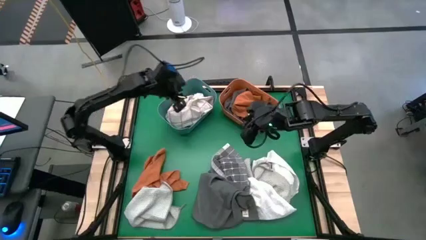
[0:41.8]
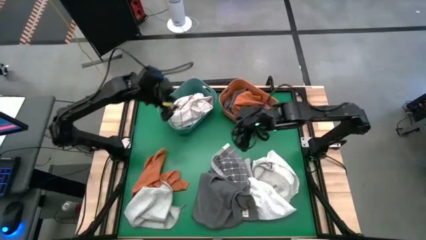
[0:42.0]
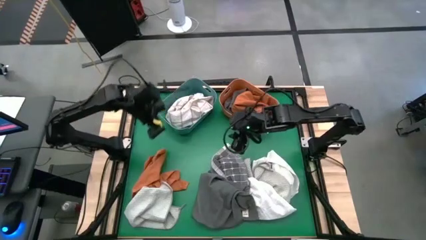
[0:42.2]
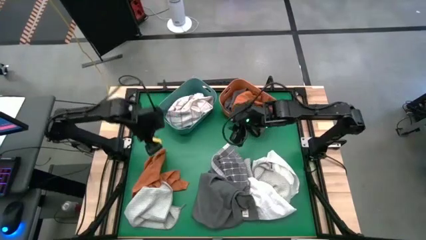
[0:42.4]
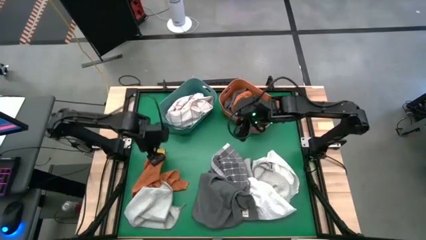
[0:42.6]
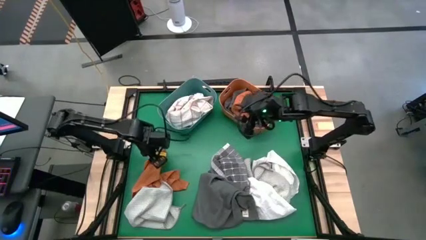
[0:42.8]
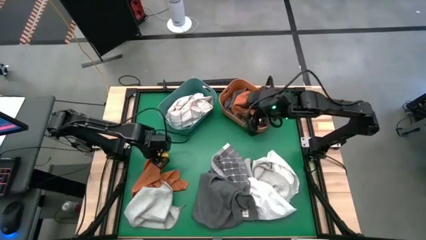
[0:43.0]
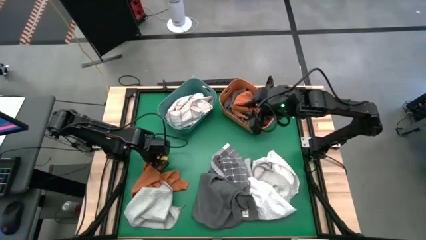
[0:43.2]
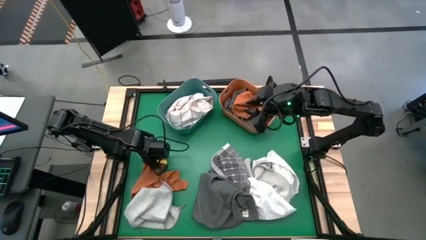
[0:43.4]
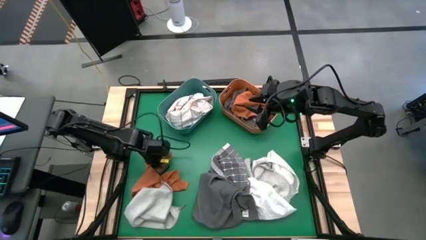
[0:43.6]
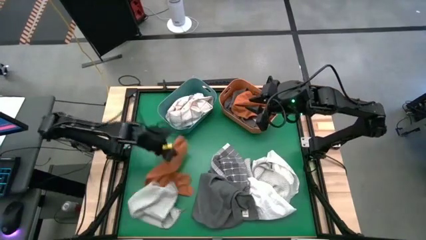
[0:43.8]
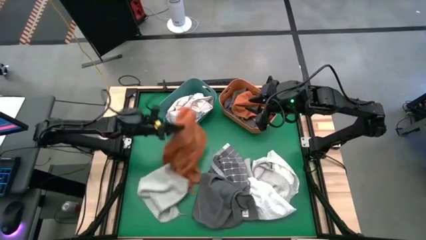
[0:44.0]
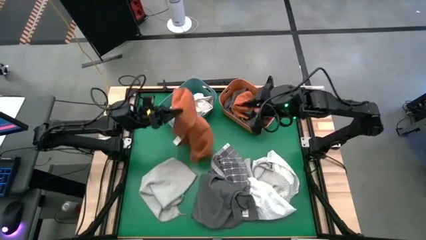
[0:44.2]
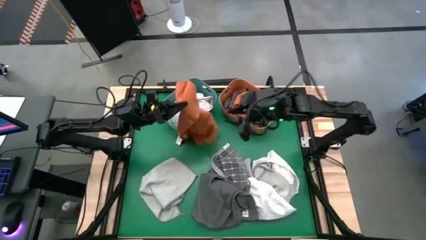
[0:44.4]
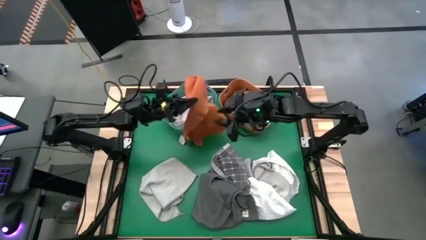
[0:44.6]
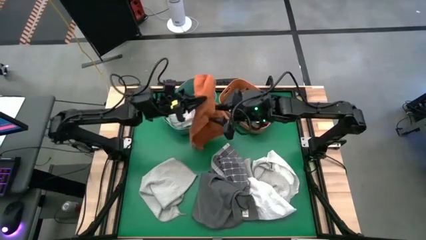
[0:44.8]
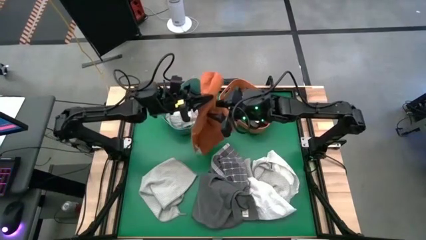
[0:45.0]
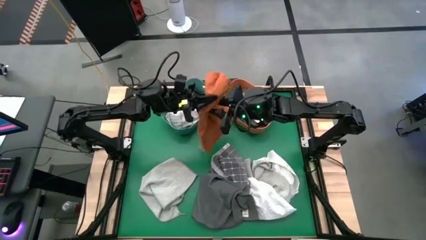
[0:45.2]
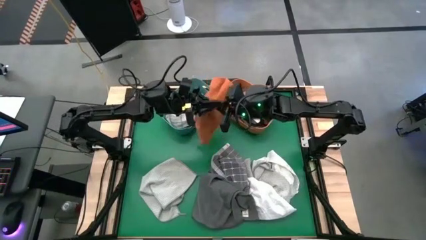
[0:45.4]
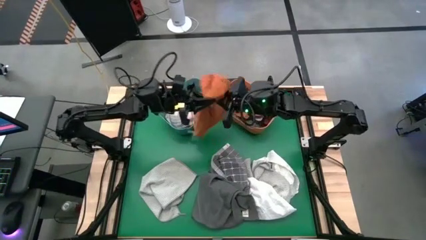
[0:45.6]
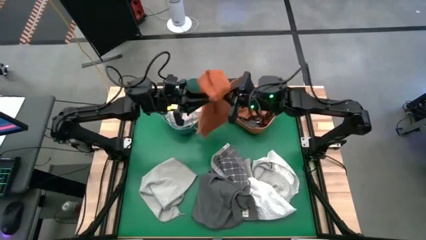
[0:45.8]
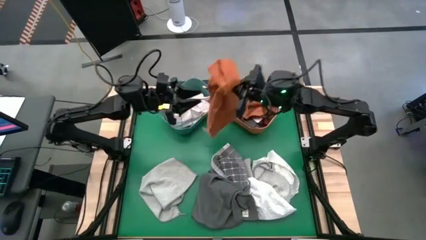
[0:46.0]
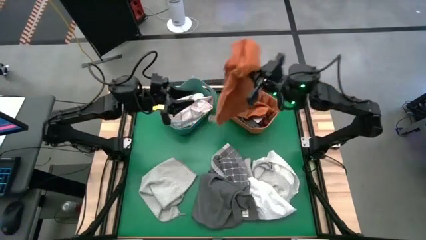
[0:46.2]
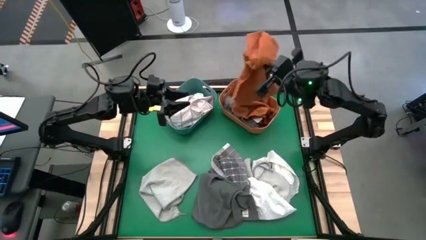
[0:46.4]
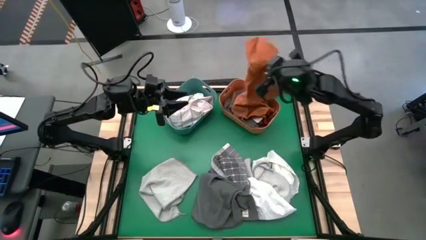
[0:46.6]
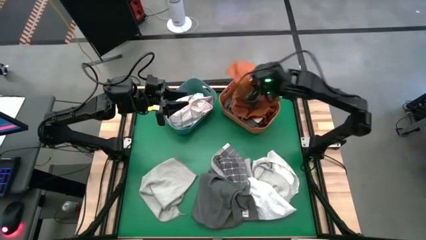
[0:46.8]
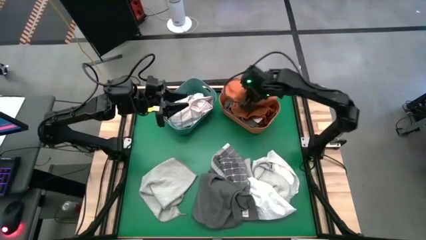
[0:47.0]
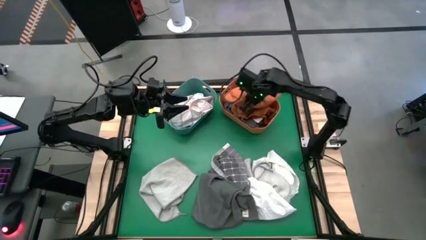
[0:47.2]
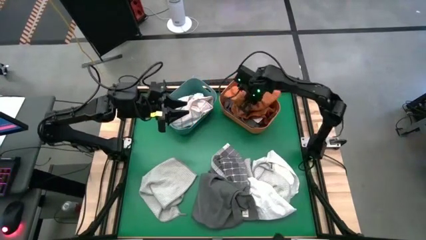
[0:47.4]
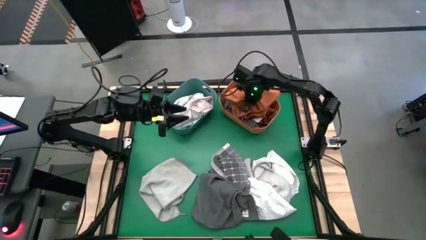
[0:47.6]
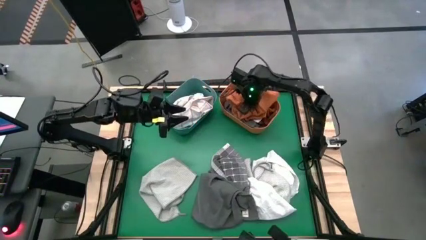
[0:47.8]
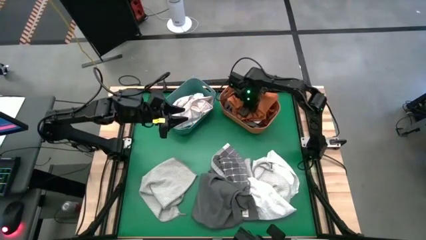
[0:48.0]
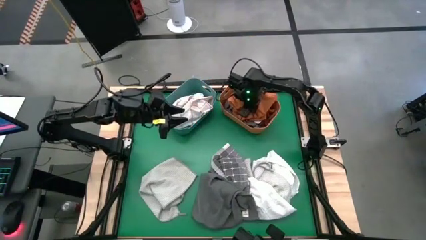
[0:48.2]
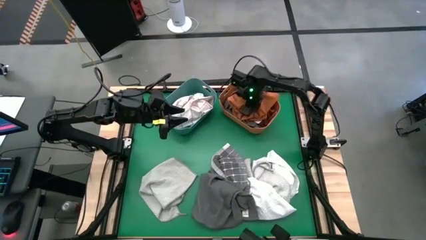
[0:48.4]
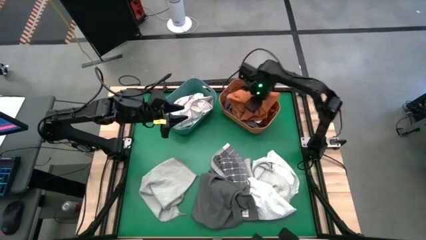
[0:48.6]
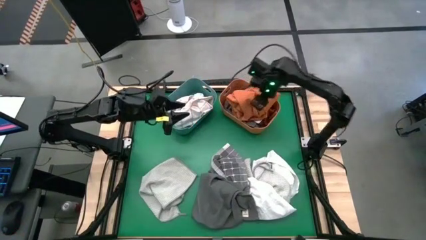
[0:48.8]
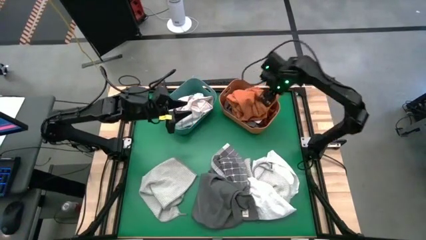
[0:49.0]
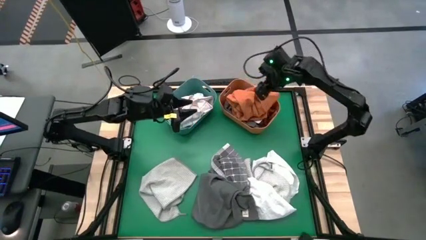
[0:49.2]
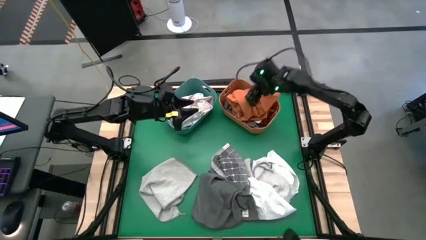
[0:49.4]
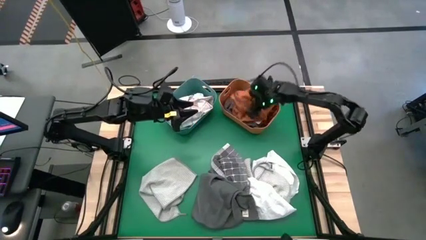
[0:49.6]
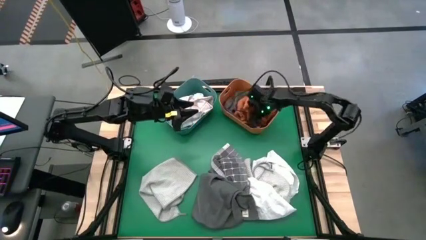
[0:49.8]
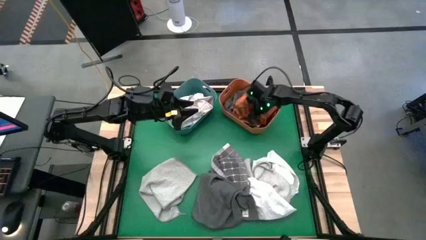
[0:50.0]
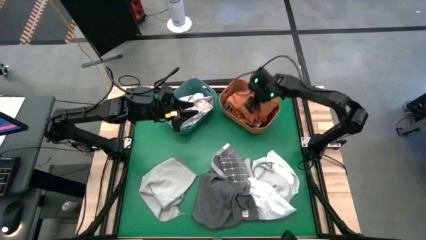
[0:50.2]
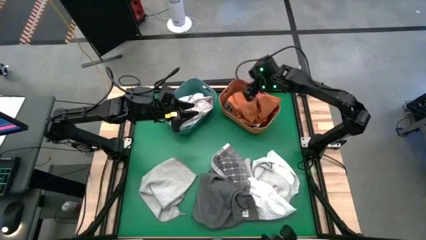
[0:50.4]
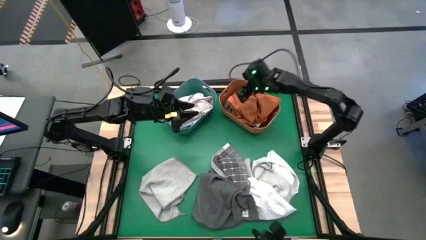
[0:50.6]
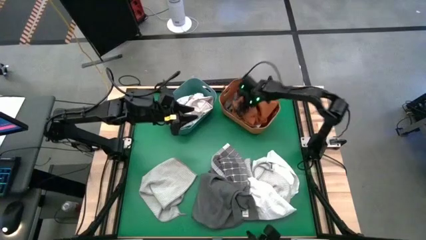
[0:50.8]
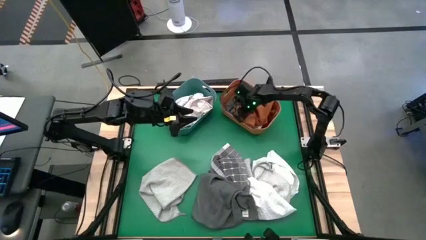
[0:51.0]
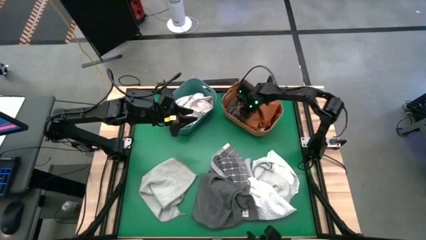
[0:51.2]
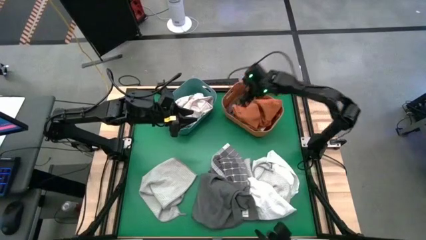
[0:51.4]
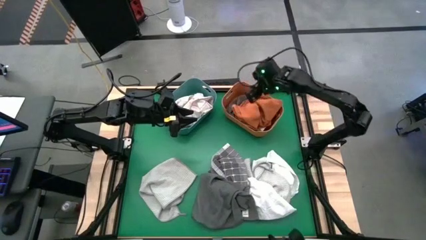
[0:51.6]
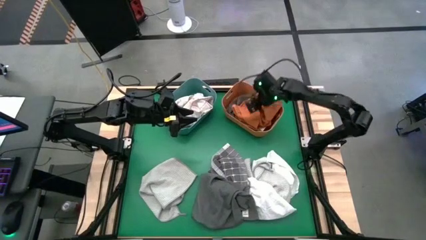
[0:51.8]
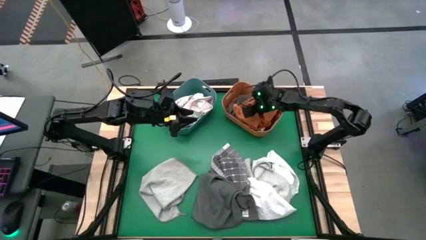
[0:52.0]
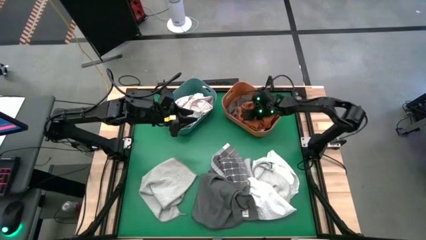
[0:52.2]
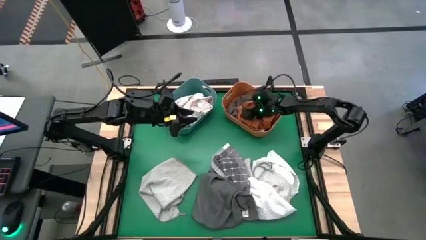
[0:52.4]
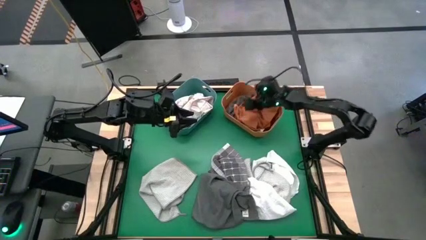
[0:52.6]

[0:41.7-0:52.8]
Task: Sort towels by color in basket
Put the orange towel into the orange bin

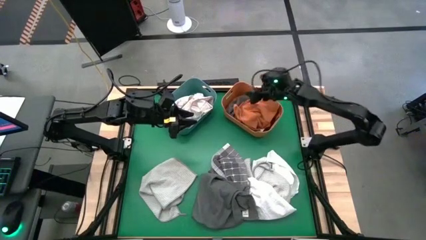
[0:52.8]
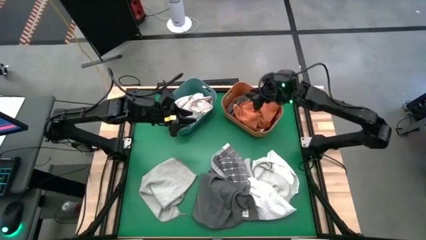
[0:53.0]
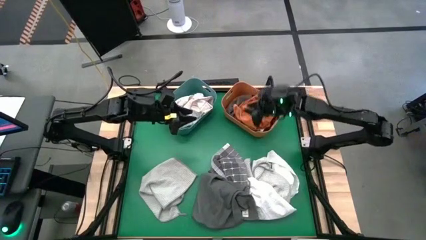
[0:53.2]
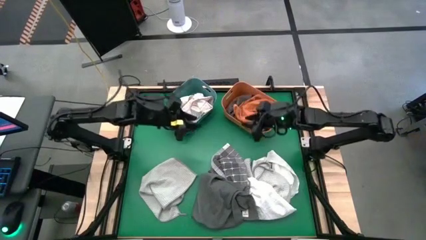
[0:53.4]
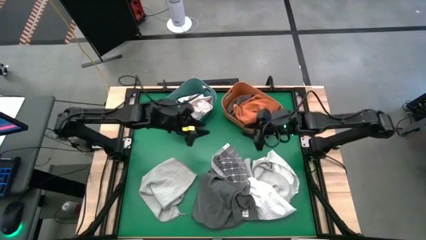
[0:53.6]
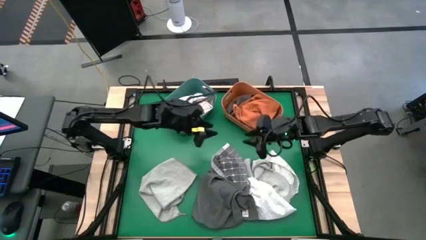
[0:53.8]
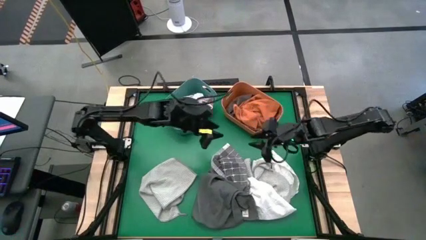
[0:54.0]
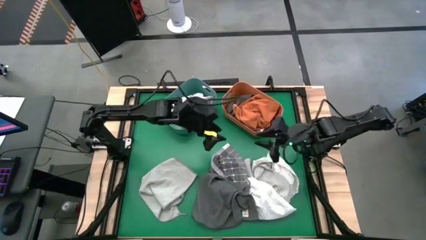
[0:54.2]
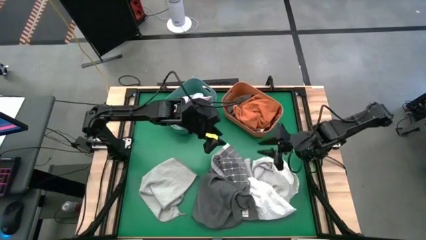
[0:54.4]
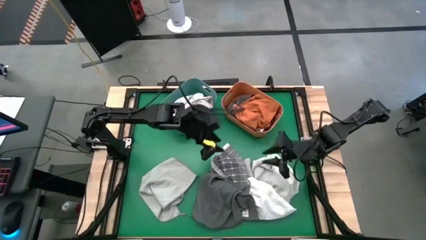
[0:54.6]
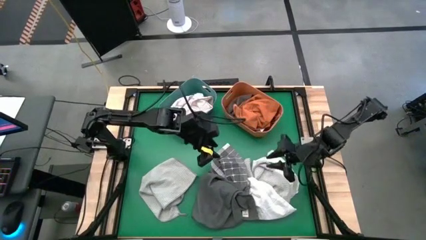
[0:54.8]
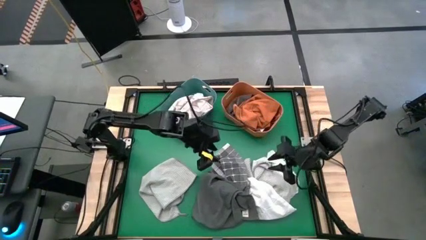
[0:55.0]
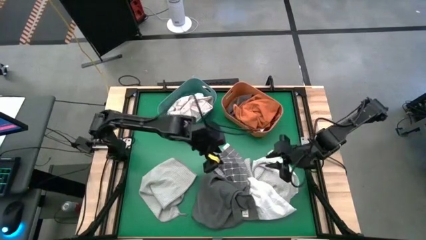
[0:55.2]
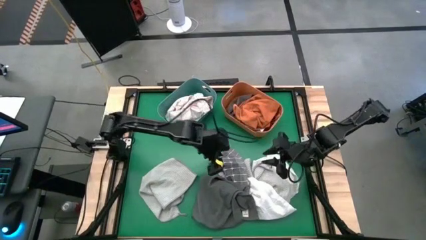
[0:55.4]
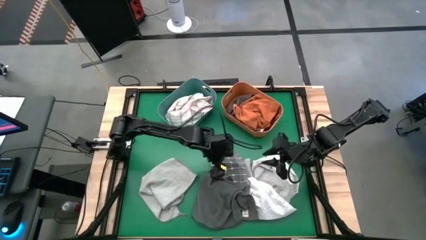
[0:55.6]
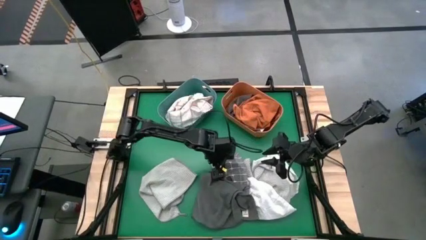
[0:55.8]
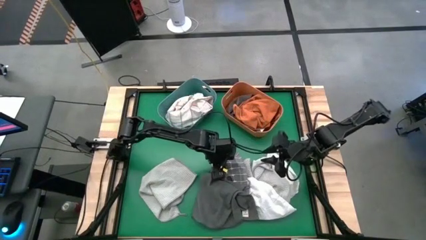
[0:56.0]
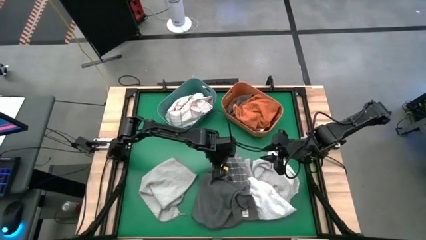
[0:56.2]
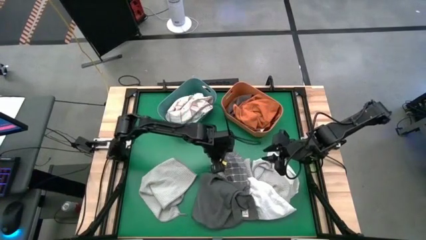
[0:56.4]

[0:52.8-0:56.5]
Put the gray patterned towel into the orange bin
